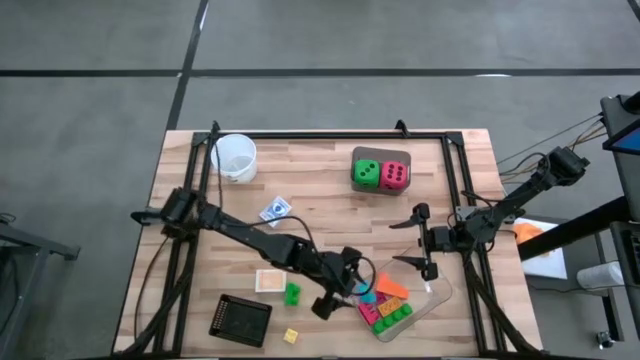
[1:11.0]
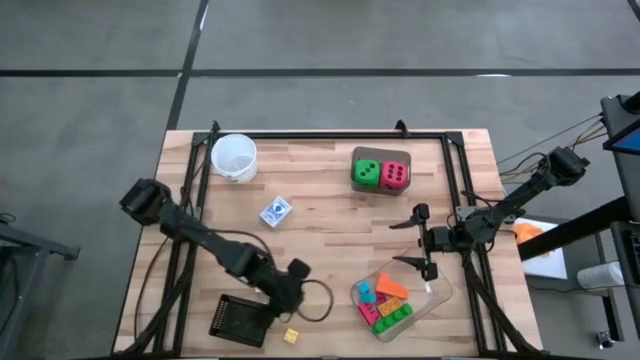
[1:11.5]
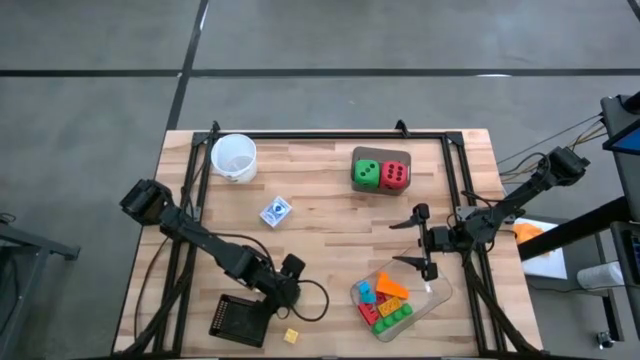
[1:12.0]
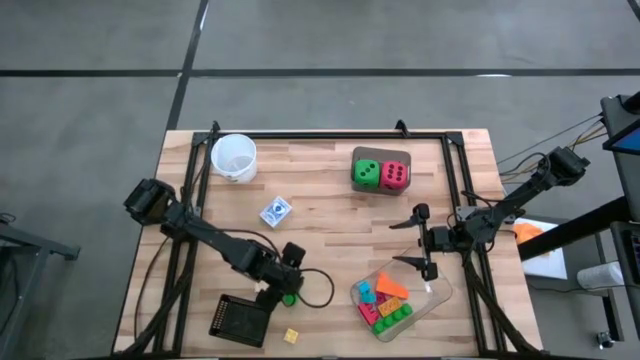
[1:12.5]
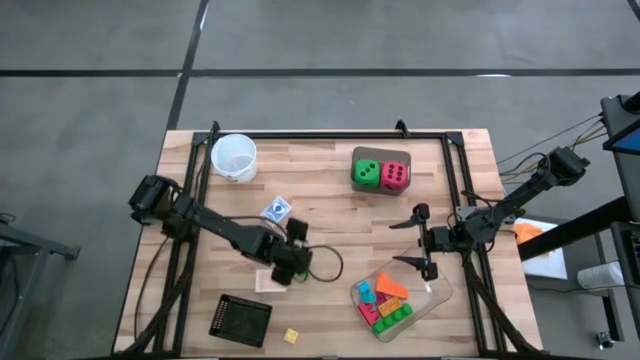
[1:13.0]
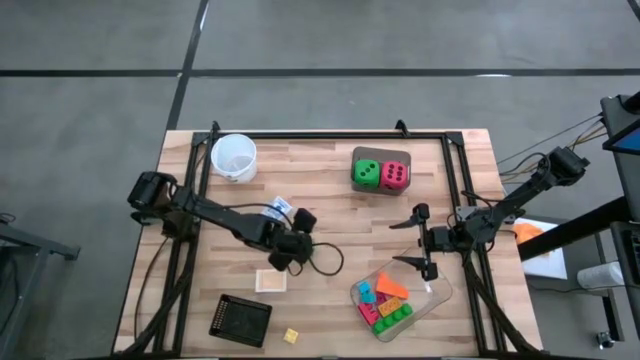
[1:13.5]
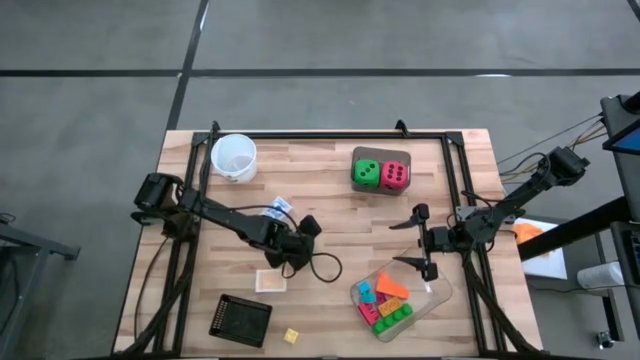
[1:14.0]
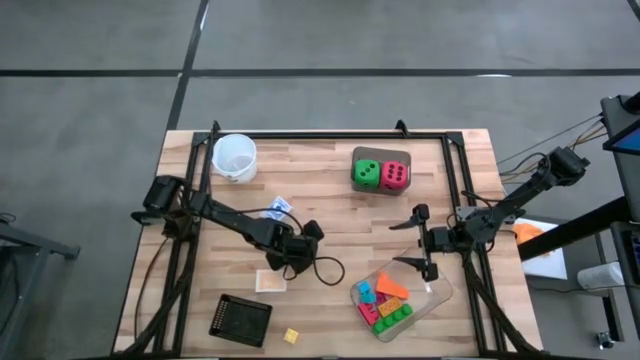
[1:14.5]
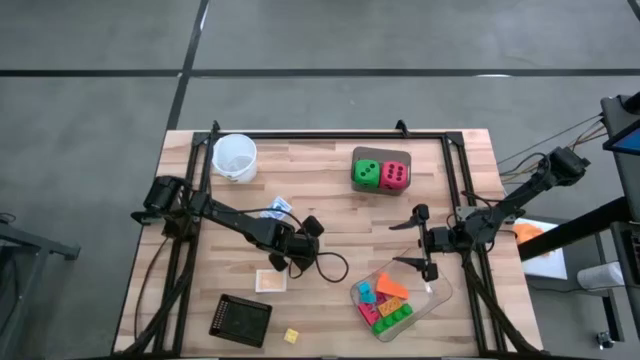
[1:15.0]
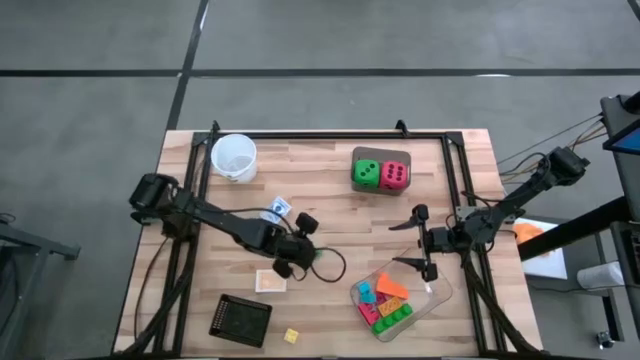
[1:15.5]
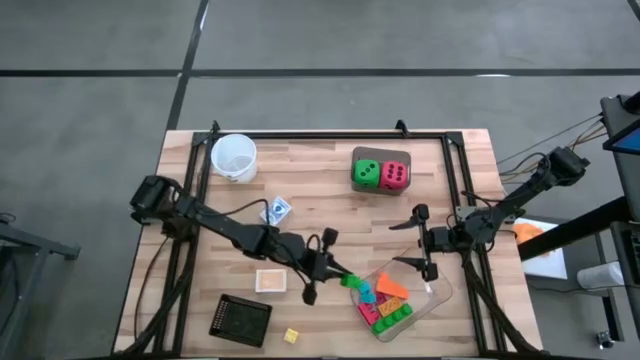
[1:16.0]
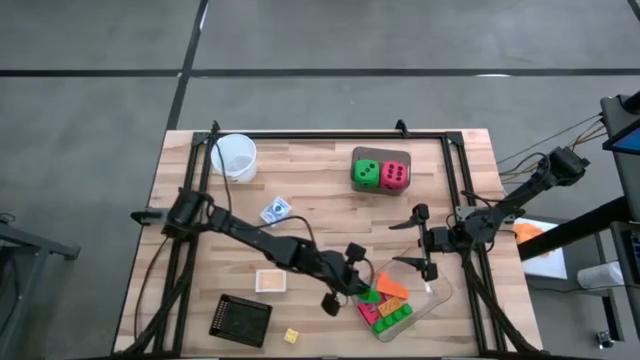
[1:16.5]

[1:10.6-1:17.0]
Task: Pick & Place Toys
Put the green game piece into the transparent bin

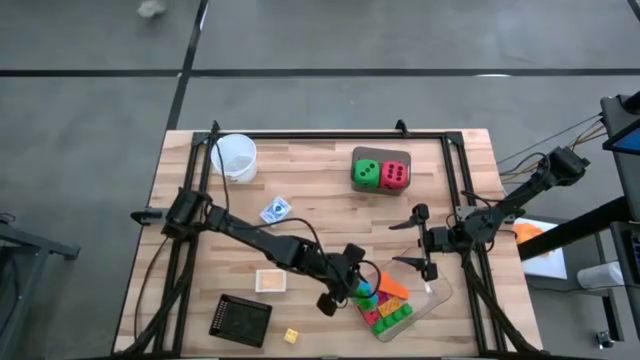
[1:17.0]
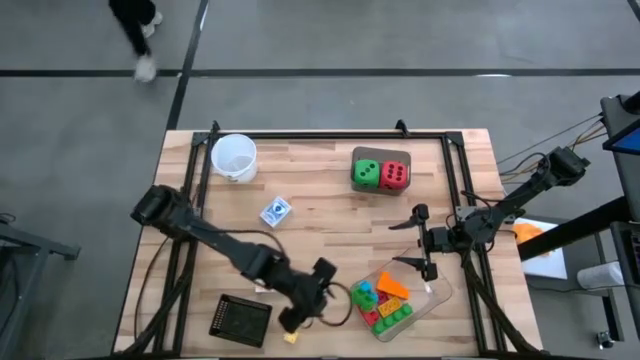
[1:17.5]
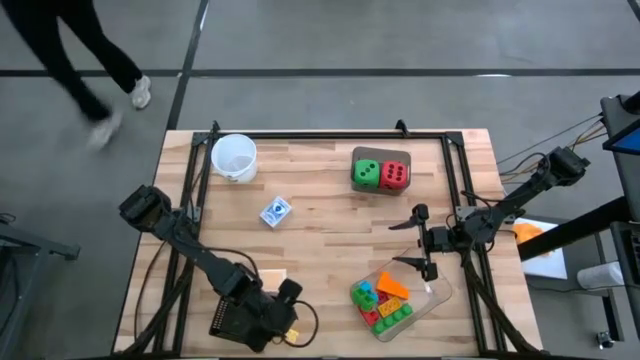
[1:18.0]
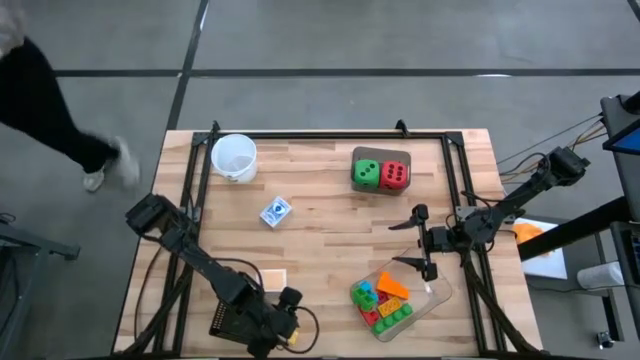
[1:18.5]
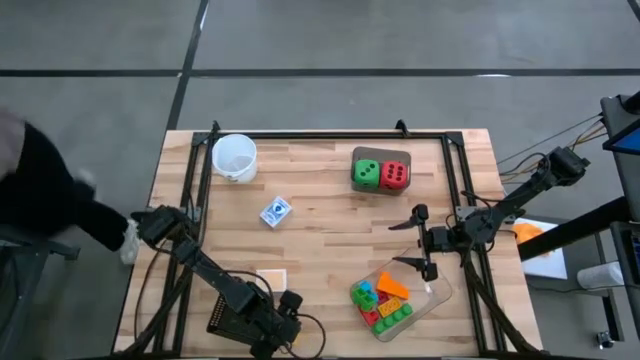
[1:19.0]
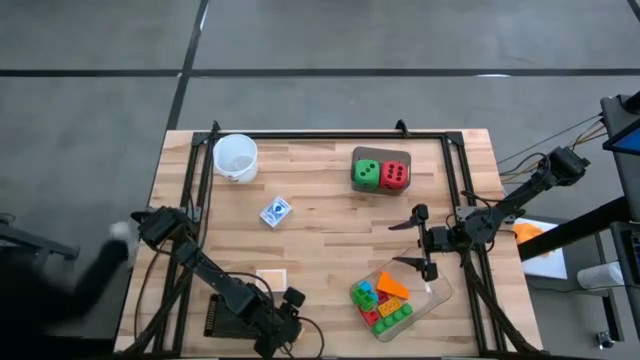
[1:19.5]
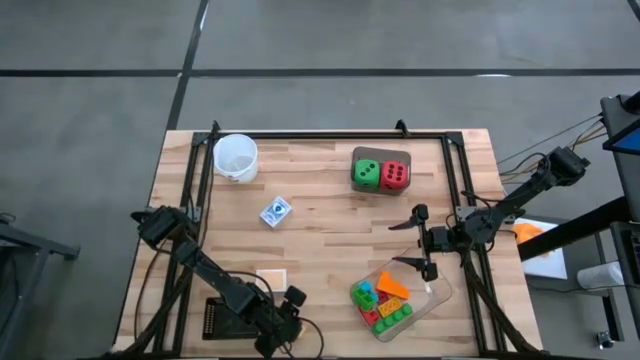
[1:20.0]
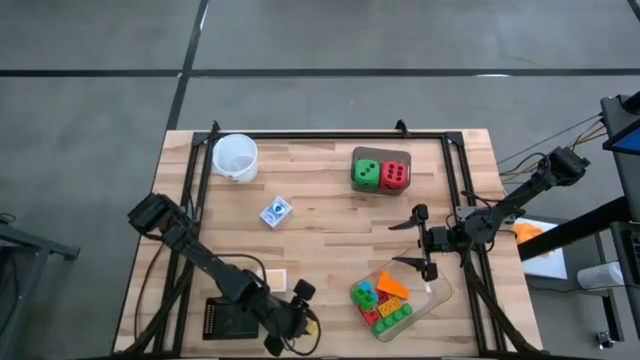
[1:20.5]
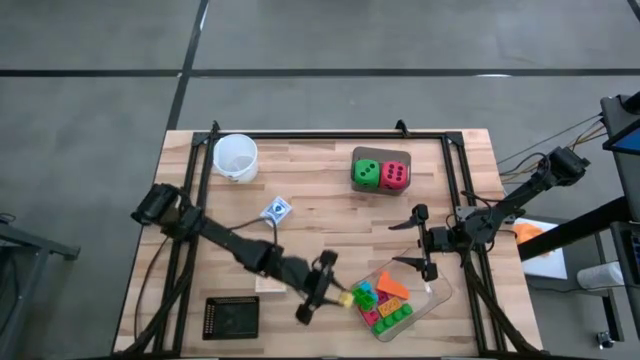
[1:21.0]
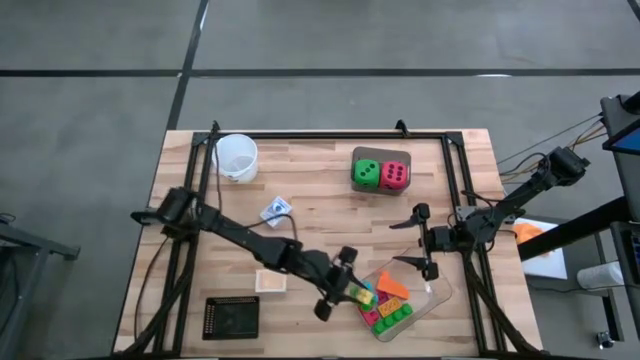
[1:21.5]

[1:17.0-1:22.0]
Put the yellow game piece into the transparent bin

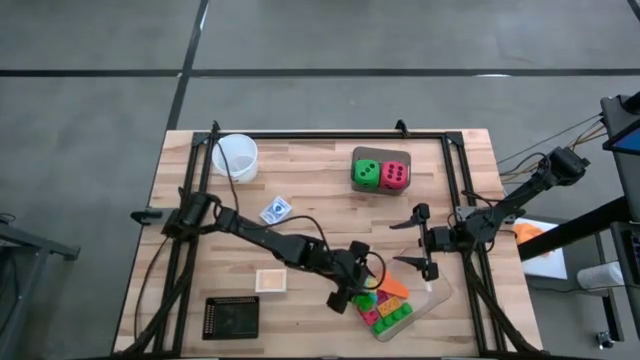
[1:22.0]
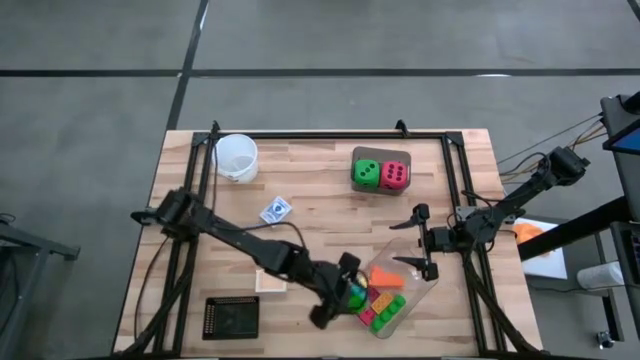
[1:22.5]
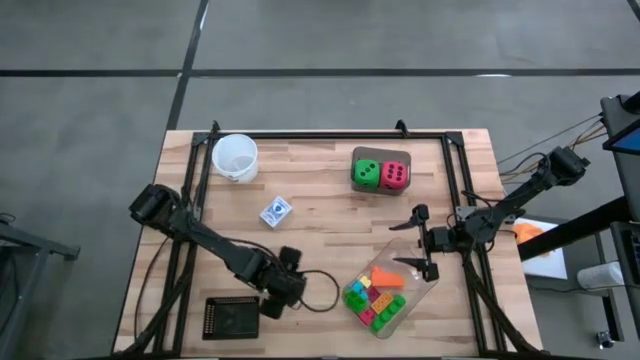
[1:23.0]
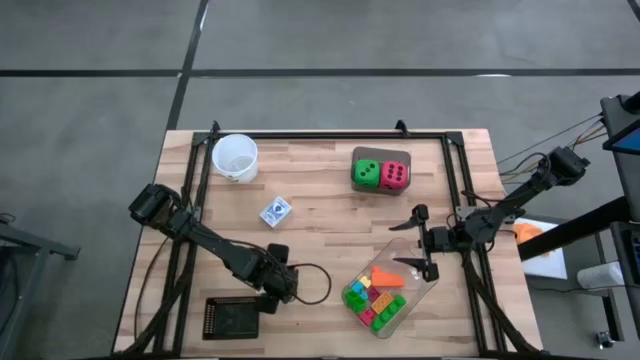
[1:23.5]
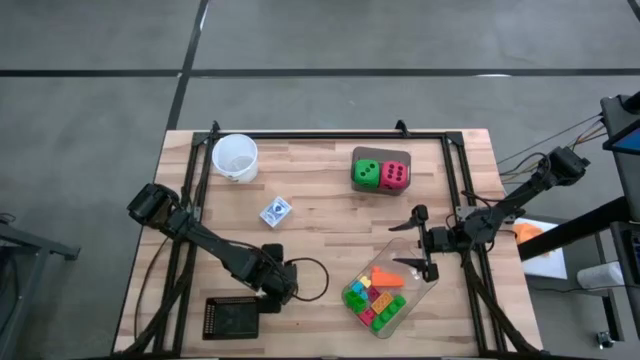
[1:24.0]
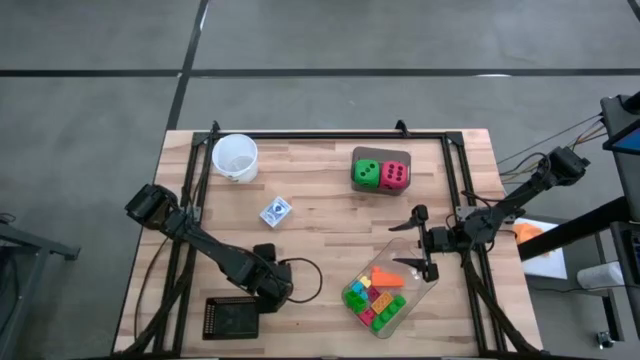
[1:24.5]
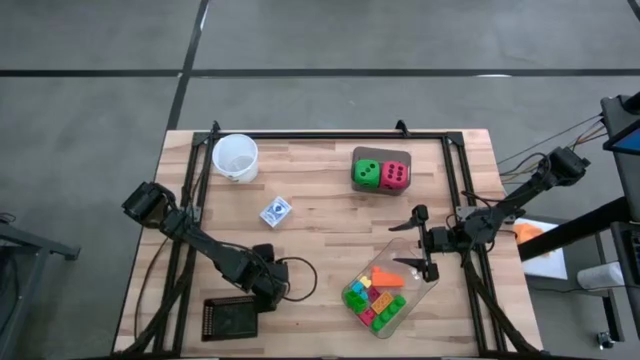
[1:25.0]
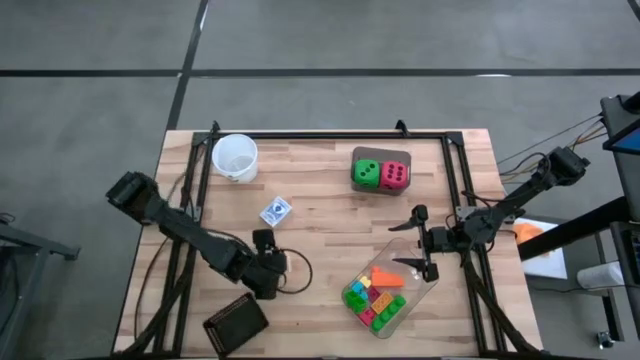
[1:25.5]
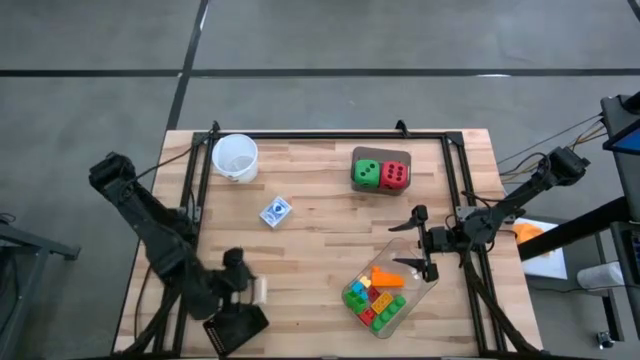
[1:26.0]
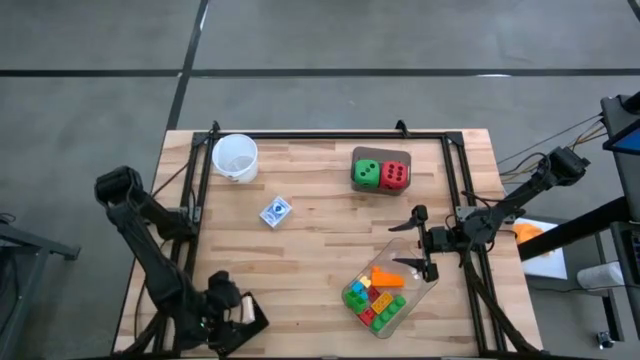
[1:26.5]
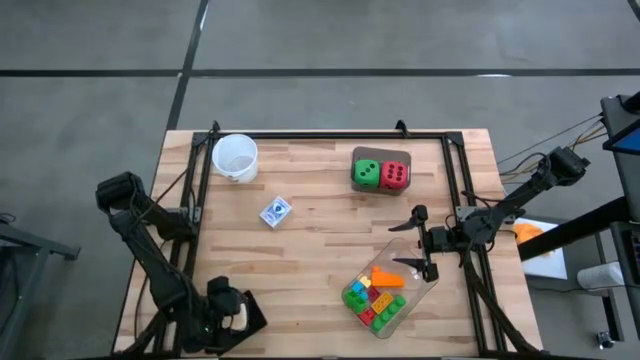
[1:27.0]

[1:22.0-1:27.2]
Put the yellow playing cards into the black bin

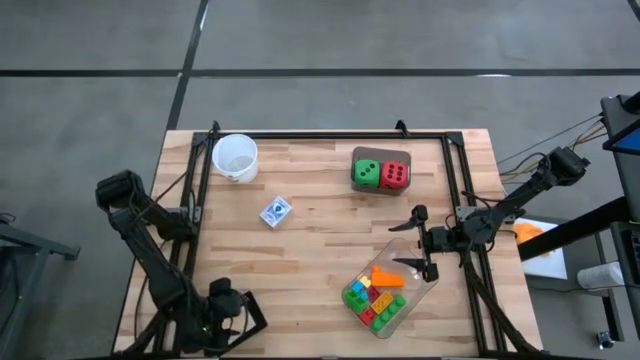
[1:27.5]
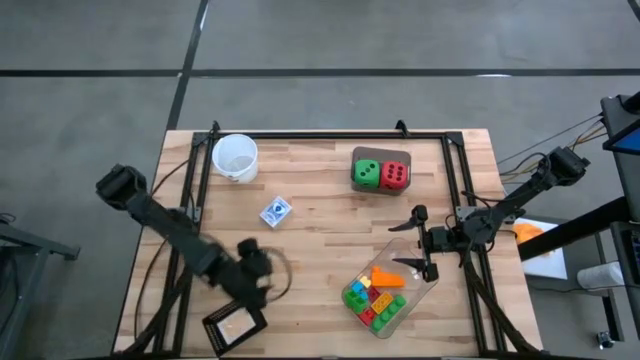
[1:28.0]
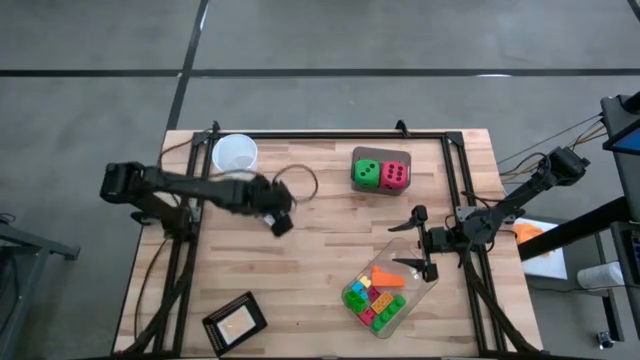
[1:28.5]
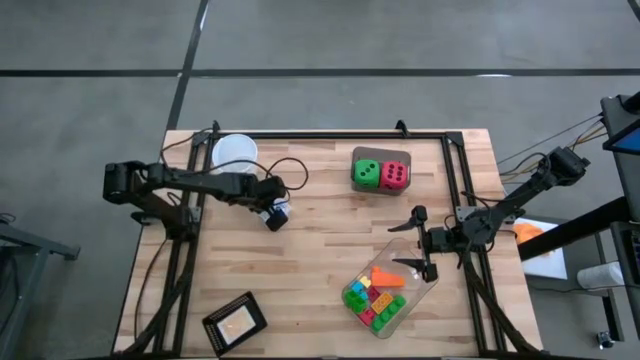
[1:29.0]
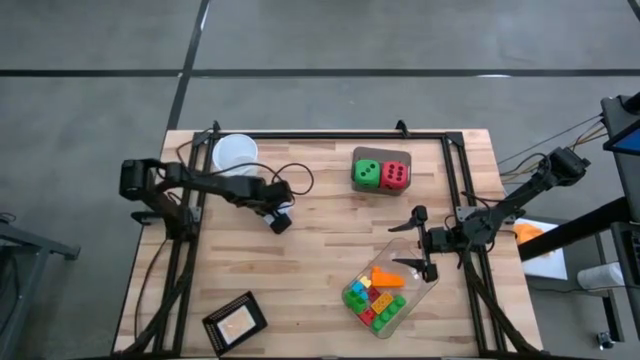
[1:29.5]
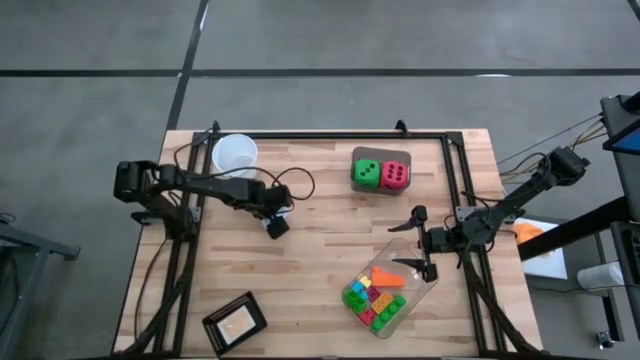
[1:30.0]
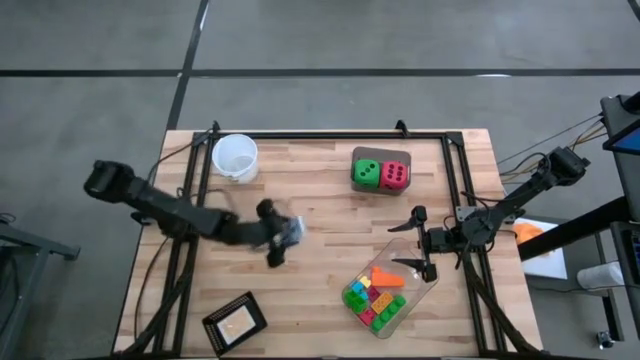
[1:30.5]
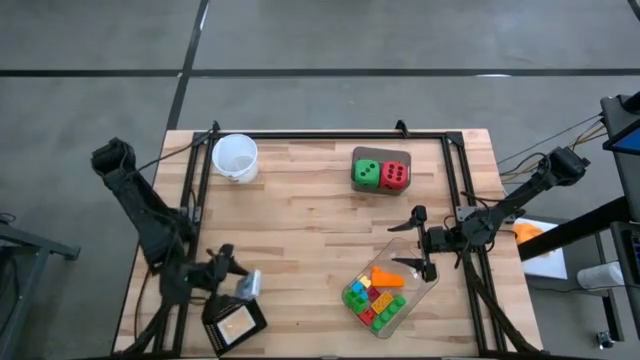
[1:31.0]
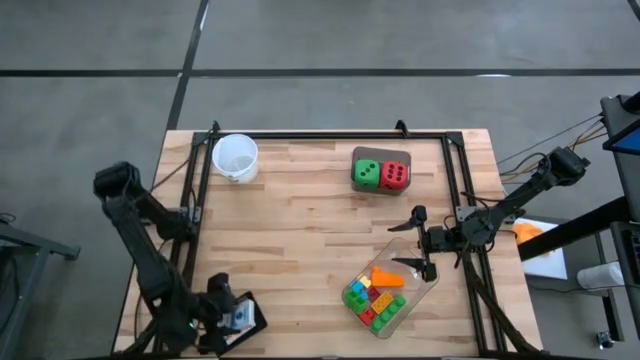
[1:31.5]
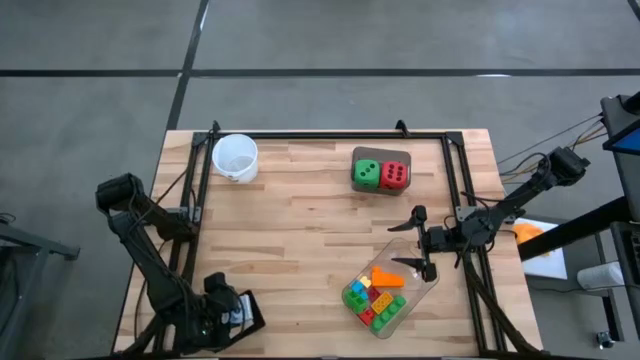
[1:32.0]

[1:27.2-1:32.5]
Put the blue playing cards into the black bin

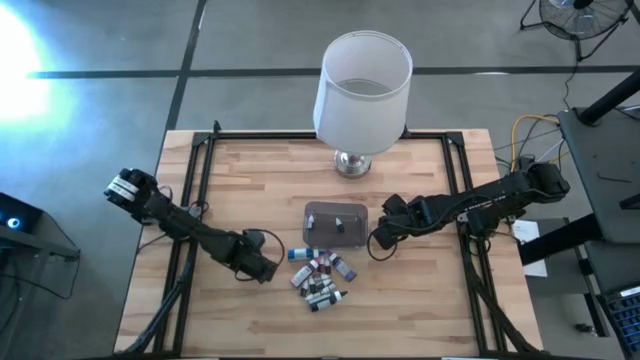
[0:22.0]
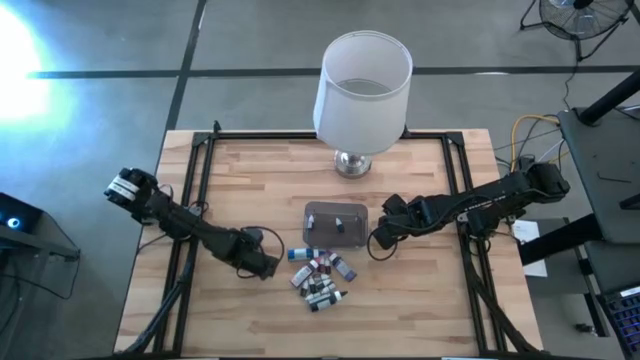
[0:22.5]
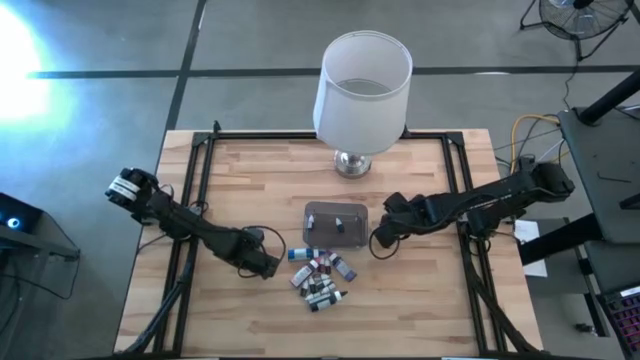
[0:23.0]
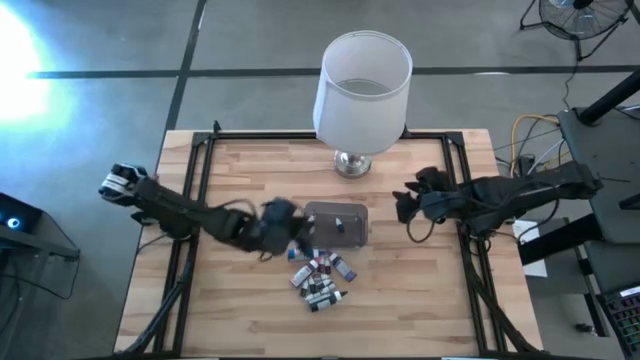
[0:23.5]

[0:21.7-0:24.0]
Task: Pick & Place food coloring
Put the small black food coloring into the black bin
